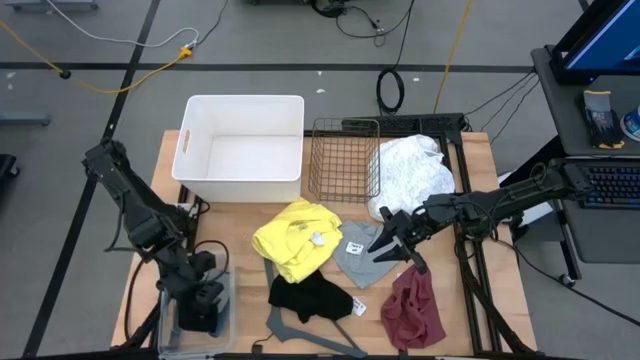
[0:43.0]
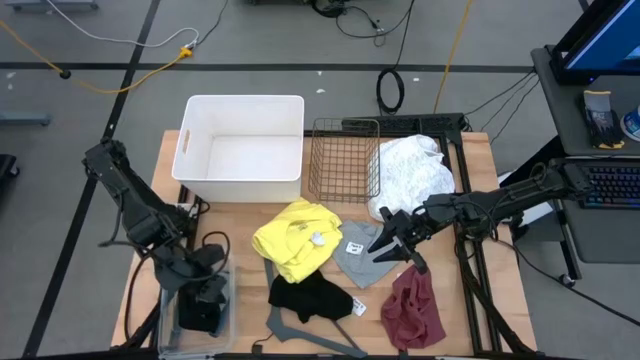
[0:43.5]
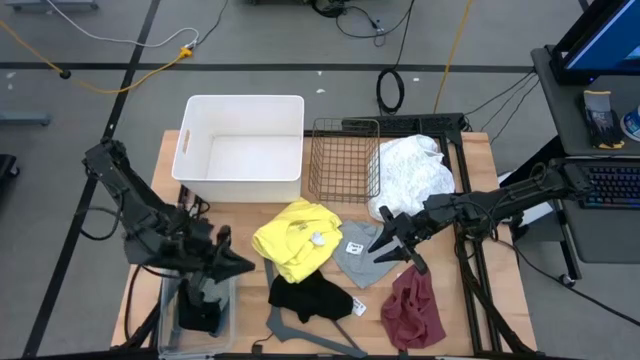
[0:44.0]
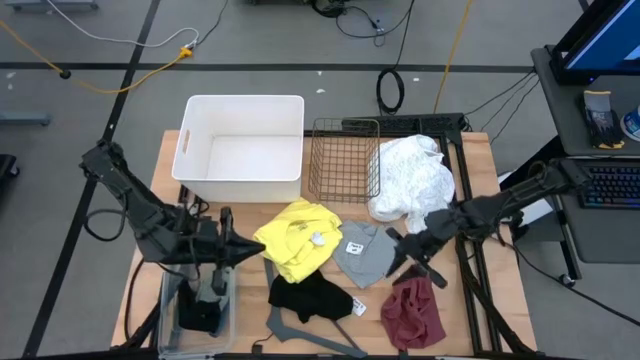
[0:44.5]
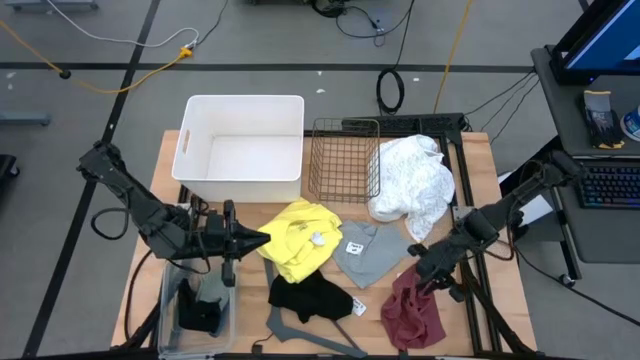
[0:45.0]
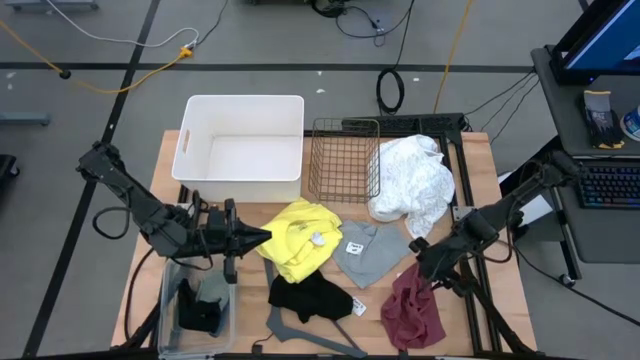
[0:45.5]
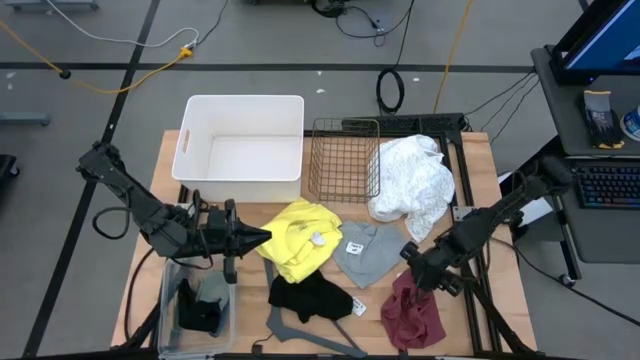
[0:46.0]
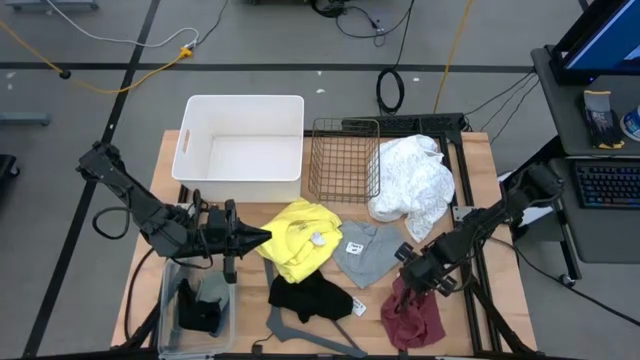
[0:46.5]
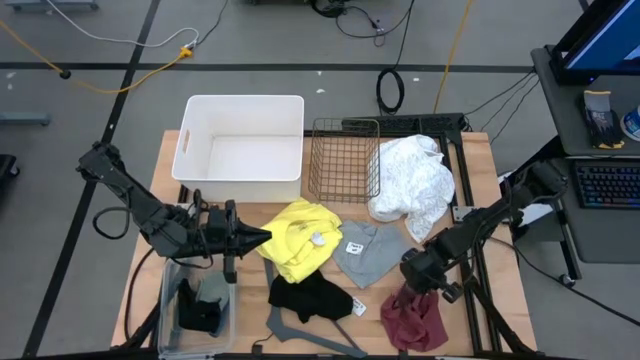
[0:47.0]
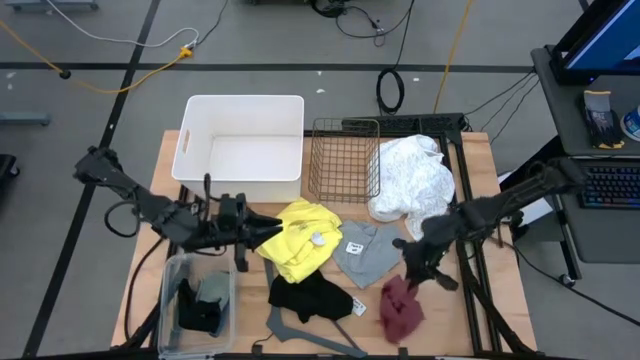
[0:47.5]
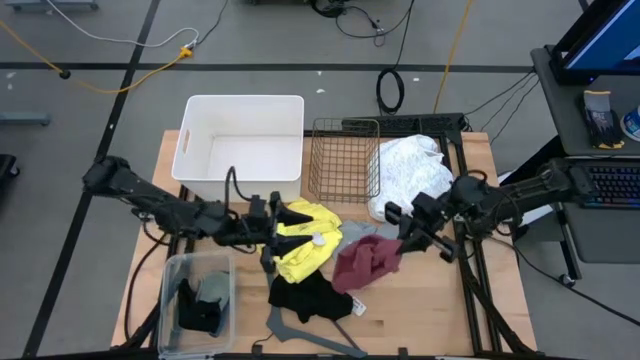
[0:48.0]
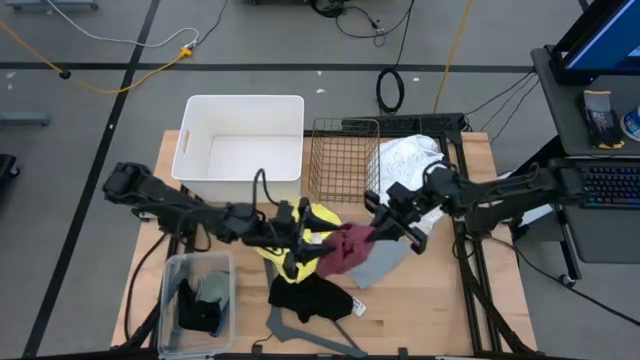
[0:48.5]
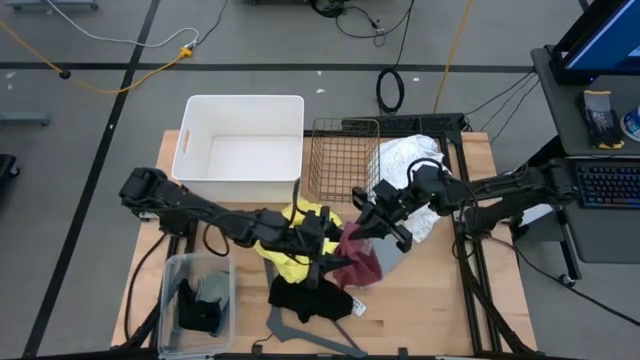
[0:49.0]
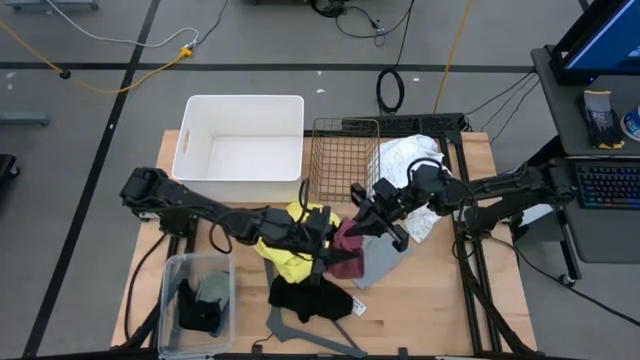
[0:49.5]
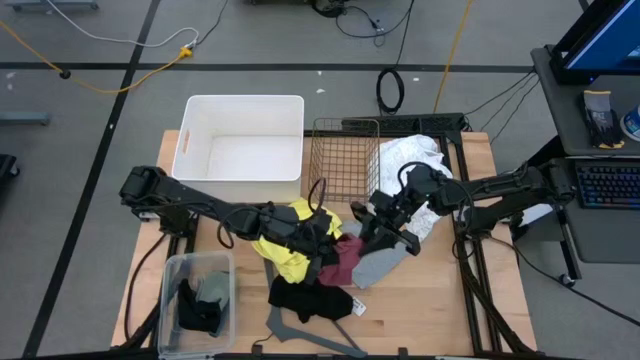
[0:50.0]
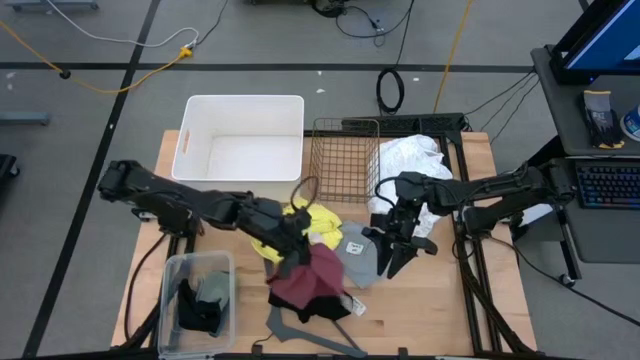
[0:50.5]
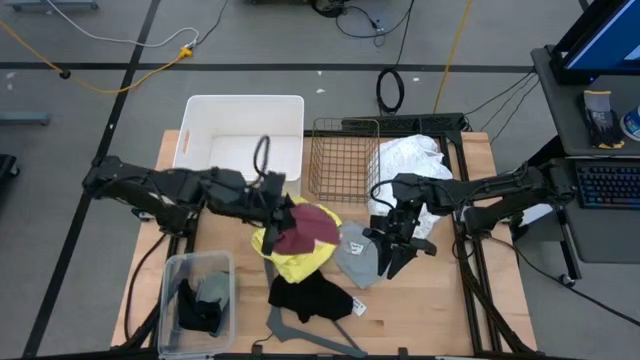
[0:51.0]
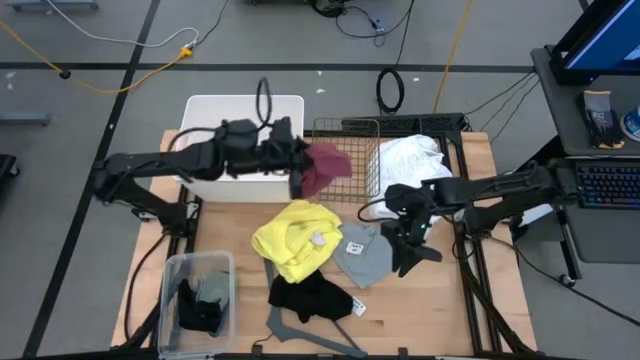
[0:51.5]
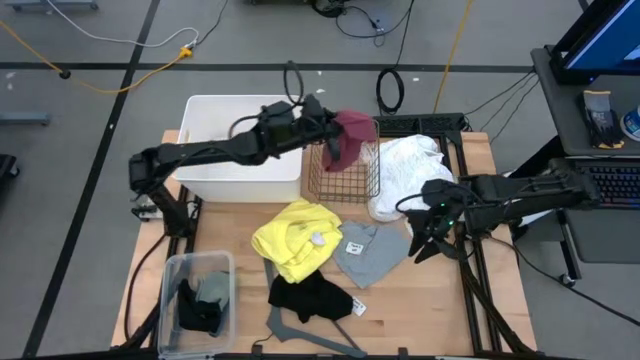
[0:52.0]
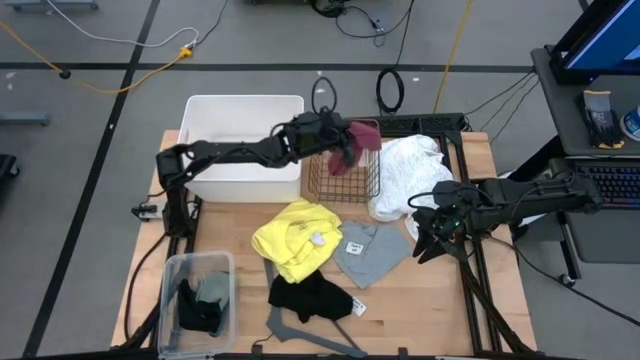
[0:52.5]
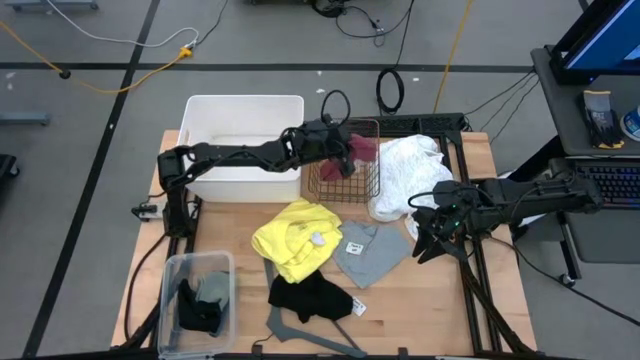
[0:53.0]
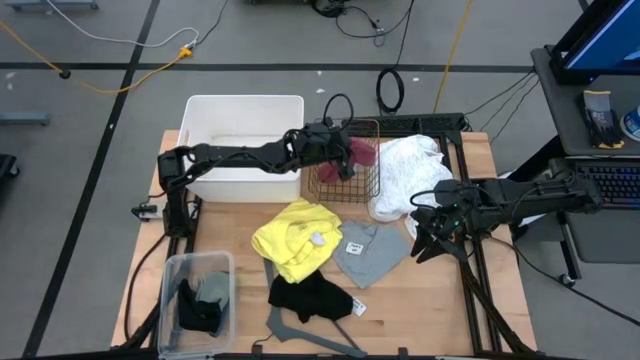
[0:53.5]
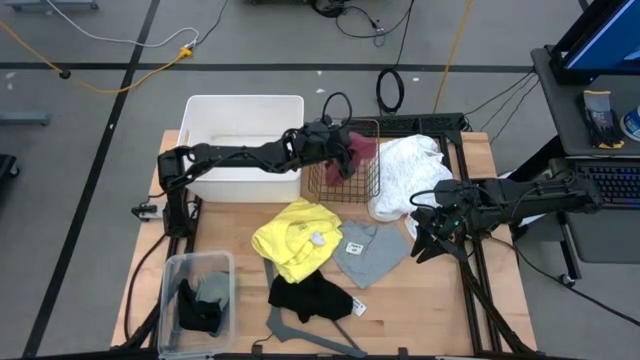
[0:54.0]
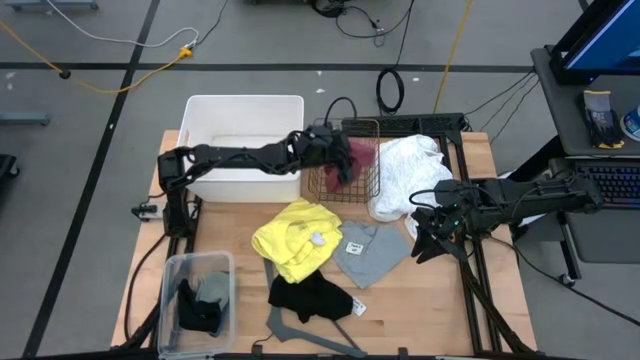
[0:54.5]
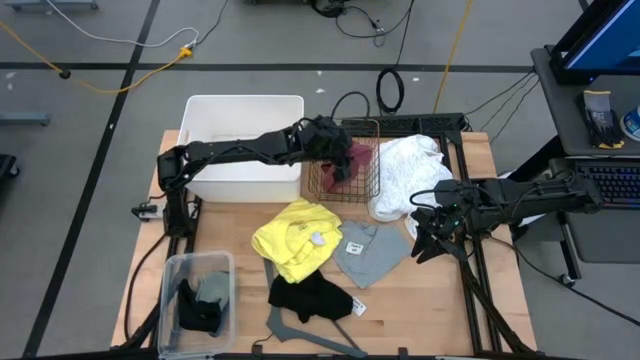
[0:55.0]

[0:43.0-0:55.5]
Task: Pick & Place Cloths
Put the red underwear into the wire basket

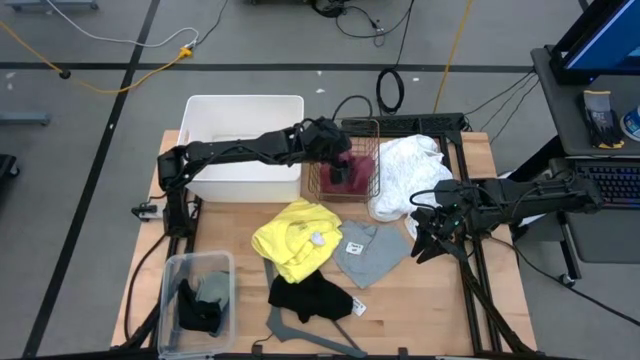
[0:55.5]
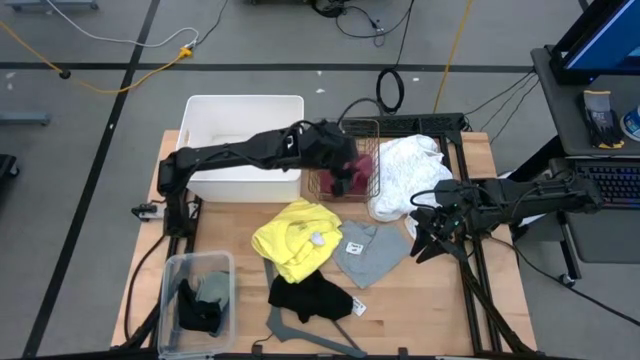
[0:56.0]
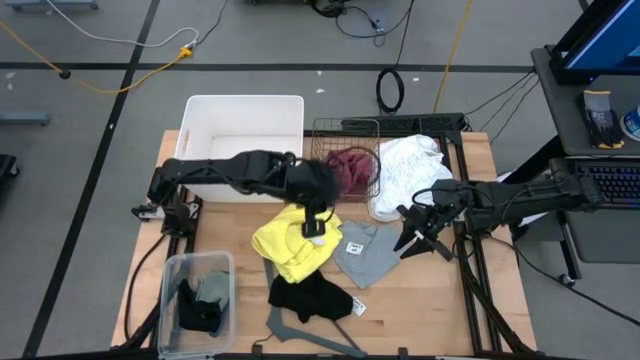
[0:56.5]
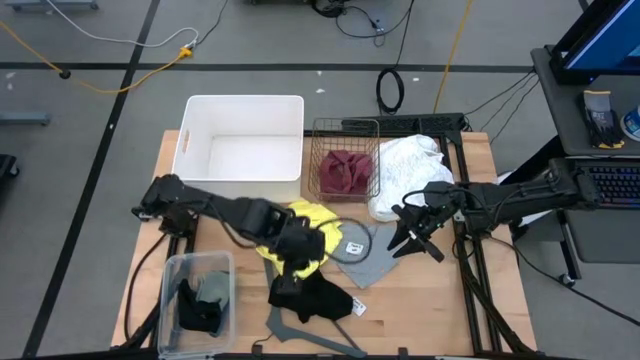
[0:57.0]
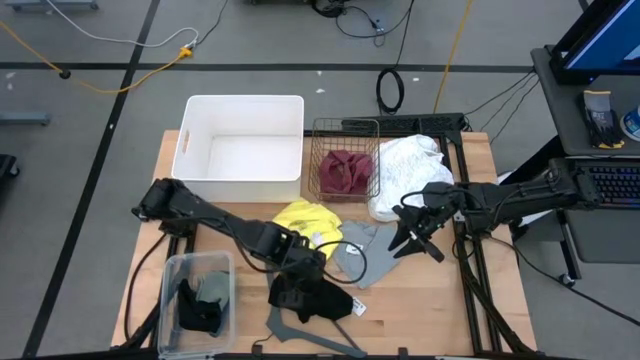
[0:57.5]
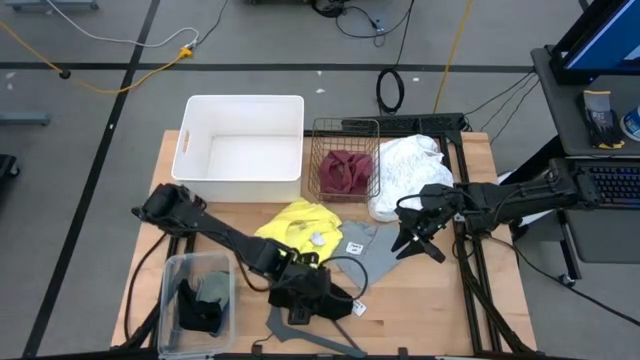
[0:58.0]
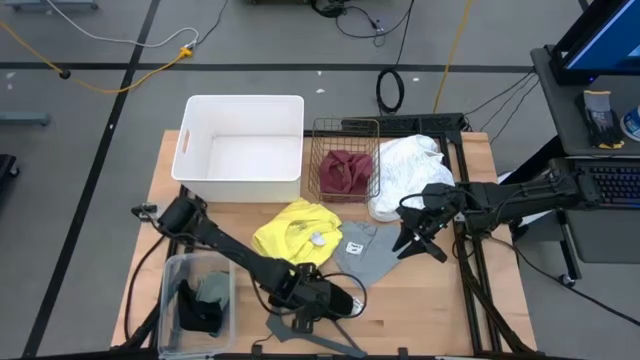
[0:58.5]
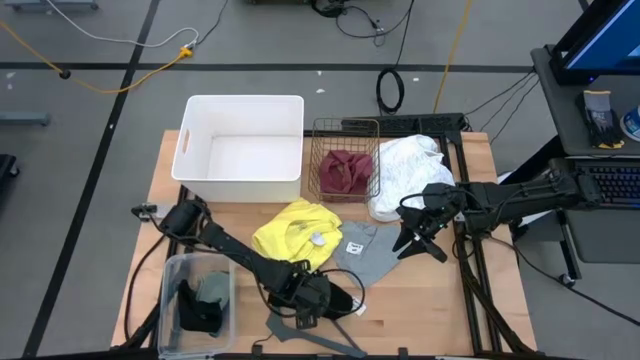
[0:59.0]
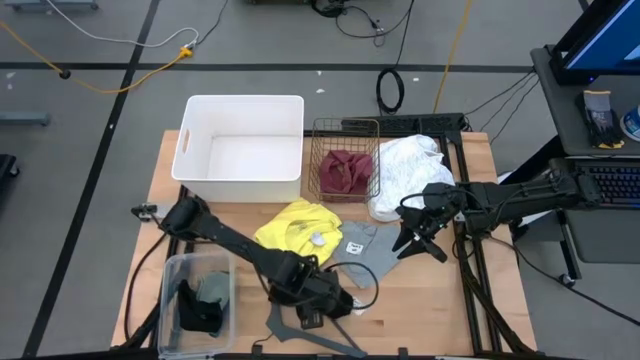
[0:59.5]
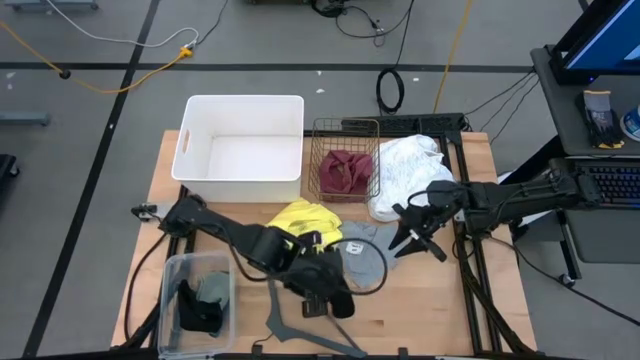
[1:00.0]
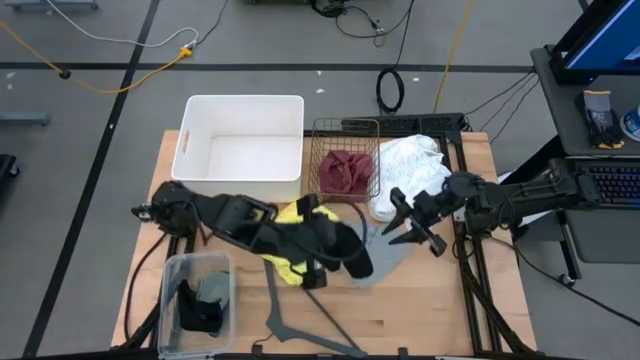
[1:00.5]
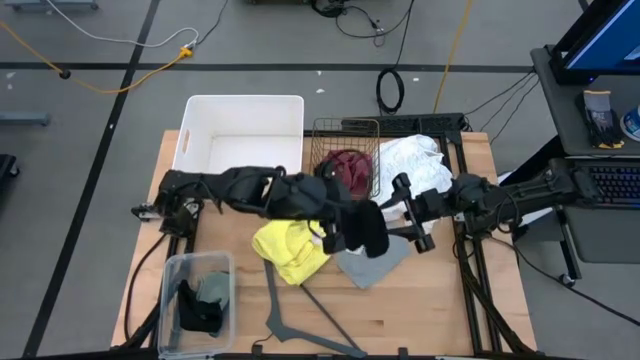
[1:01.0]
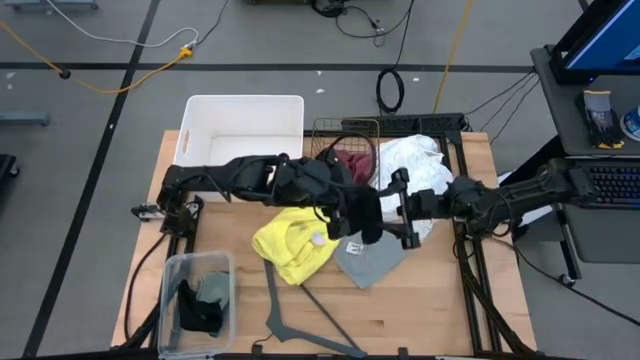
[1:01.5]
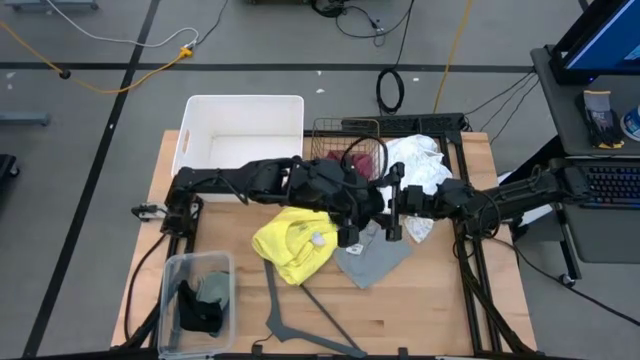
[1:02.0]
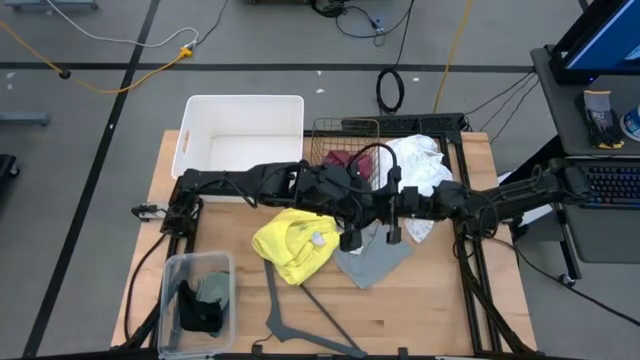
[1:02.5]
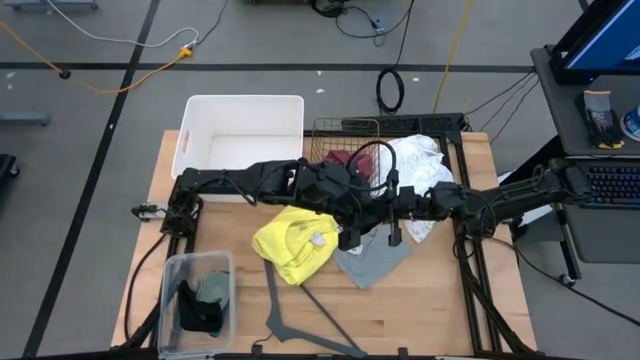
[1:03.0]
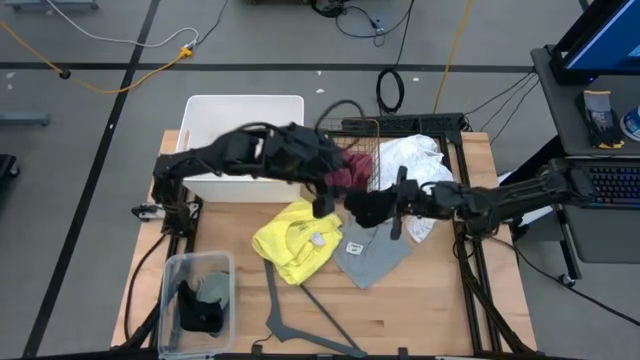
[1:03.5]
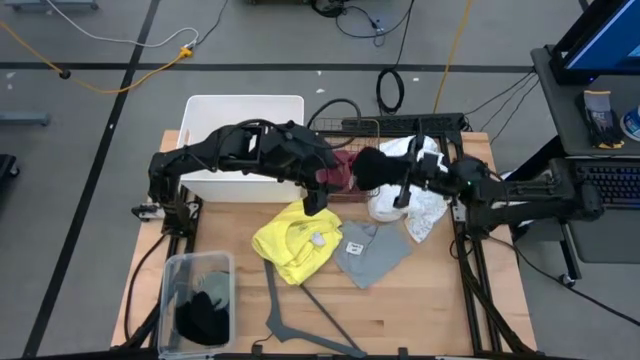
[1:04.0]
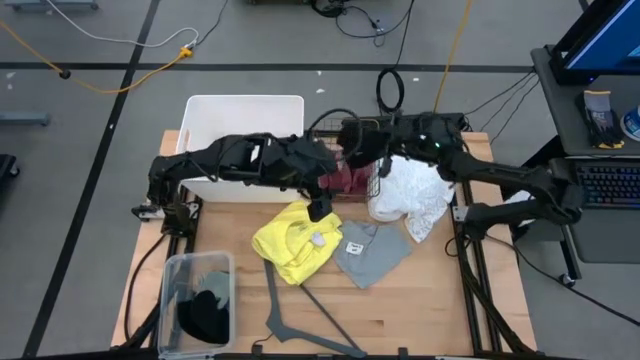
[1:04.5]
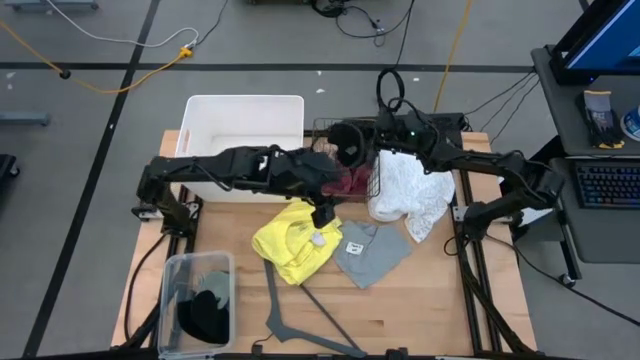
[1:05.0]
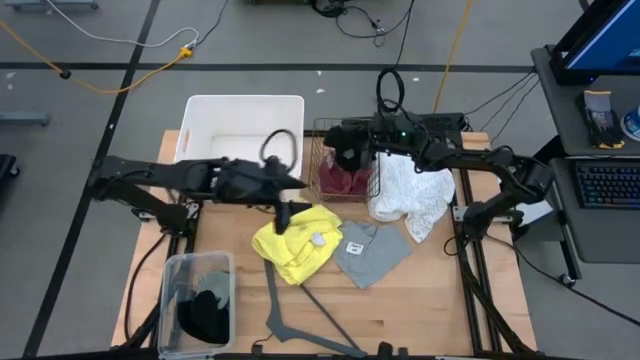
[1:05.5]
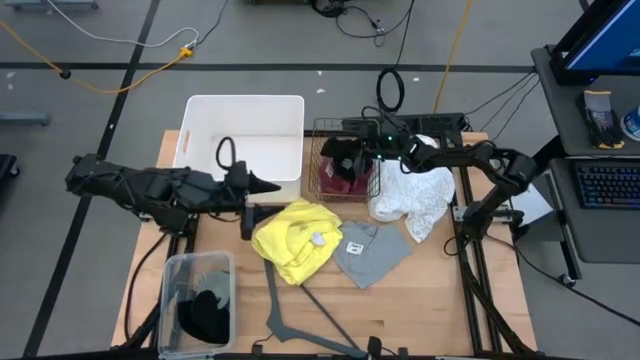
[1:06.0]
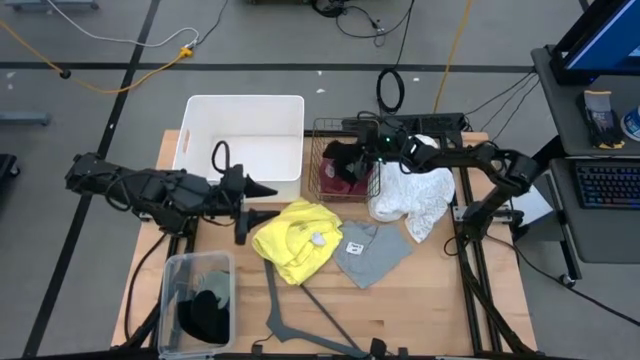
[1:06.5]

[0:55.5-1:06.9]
Put the black underwear into the wire basket
